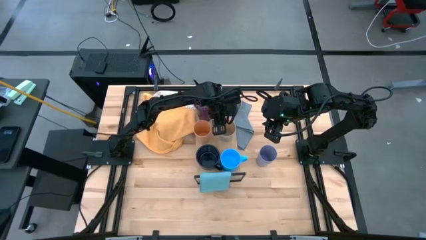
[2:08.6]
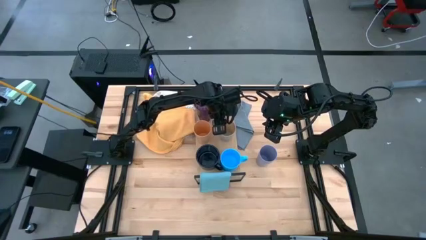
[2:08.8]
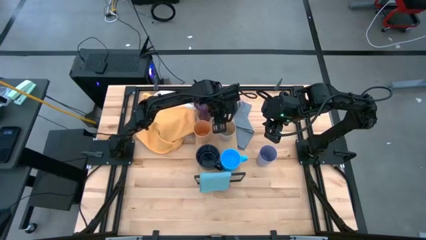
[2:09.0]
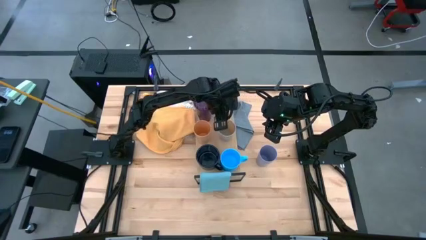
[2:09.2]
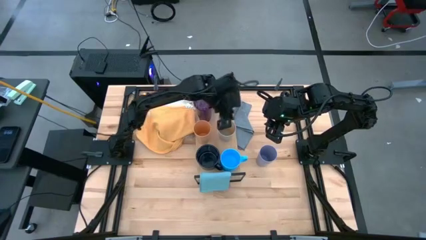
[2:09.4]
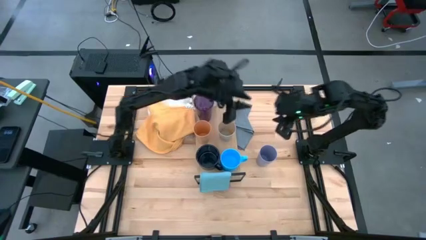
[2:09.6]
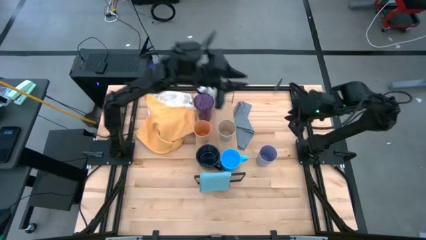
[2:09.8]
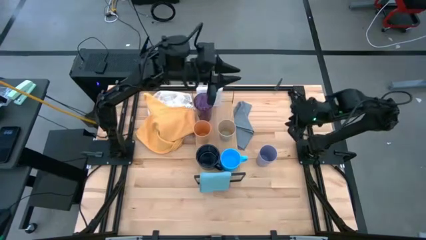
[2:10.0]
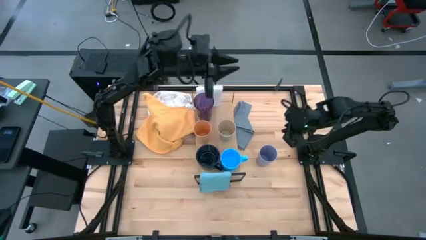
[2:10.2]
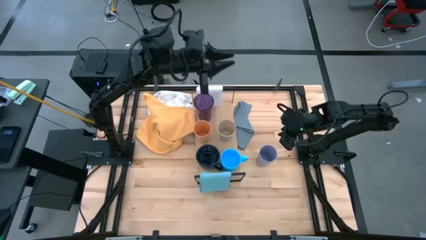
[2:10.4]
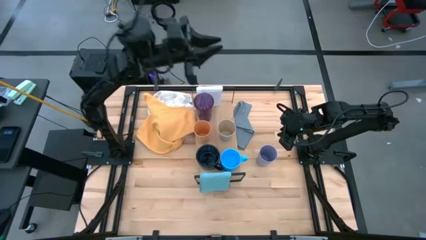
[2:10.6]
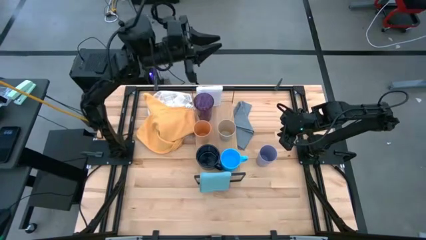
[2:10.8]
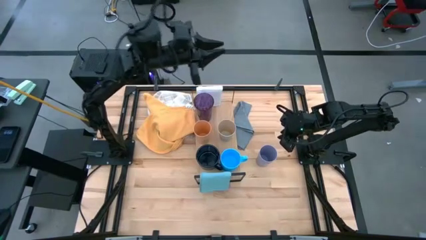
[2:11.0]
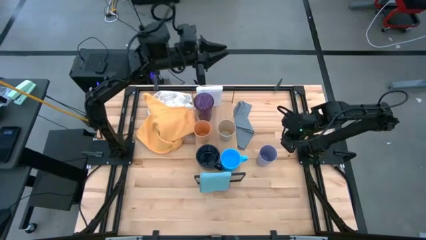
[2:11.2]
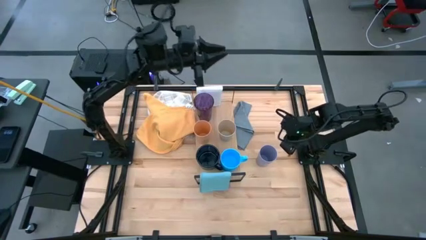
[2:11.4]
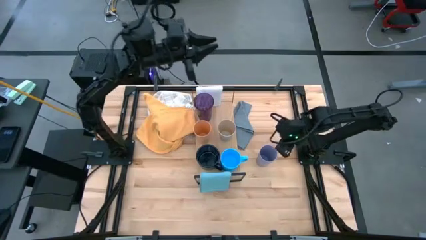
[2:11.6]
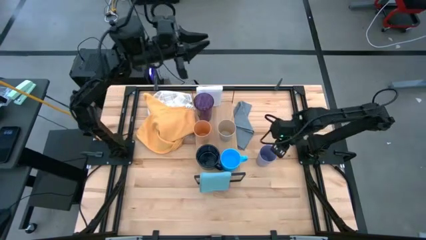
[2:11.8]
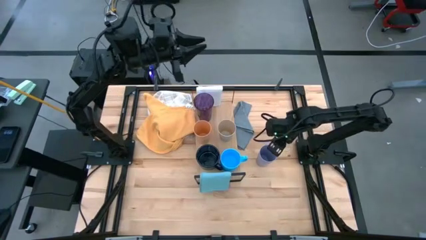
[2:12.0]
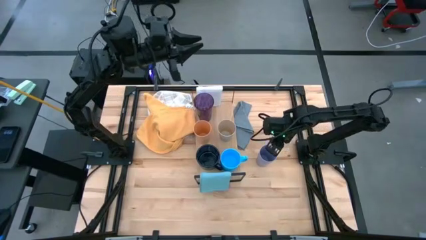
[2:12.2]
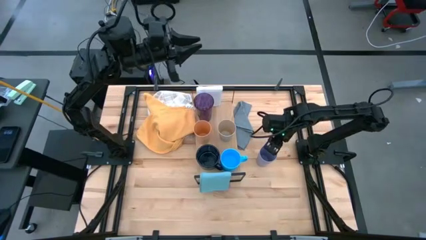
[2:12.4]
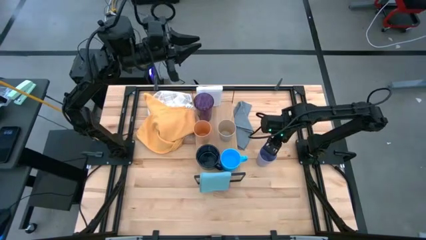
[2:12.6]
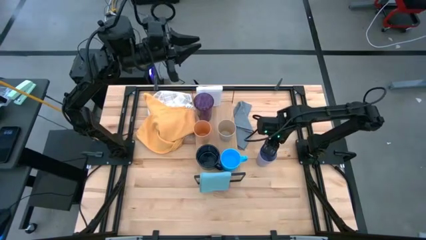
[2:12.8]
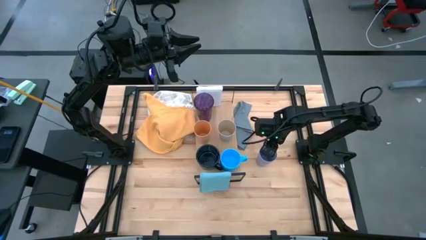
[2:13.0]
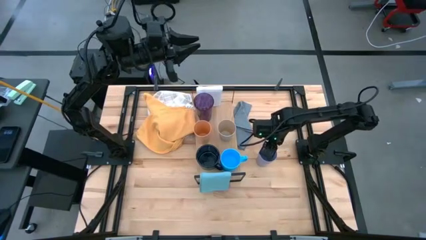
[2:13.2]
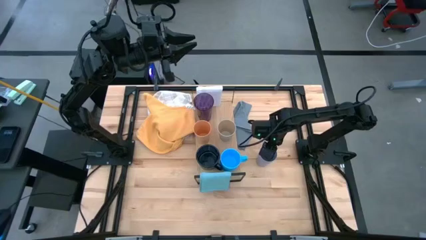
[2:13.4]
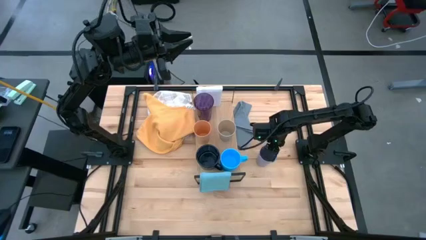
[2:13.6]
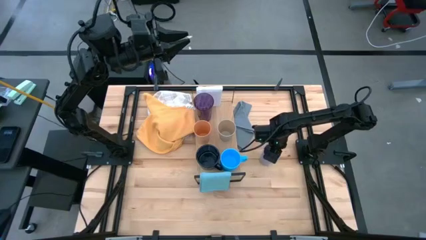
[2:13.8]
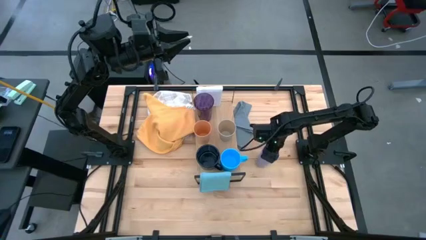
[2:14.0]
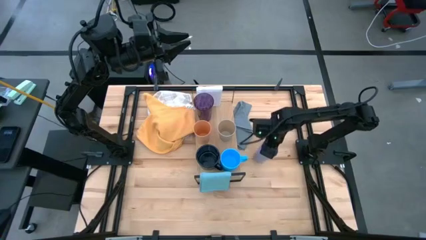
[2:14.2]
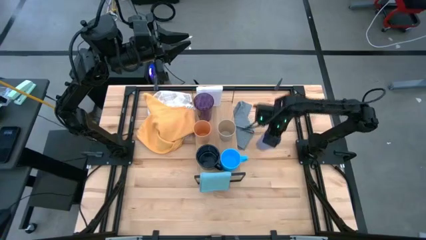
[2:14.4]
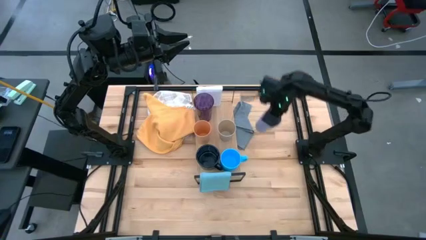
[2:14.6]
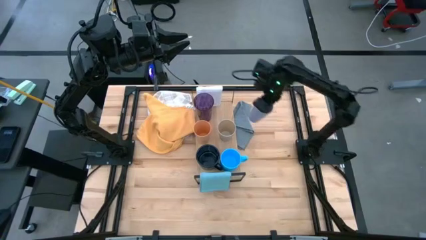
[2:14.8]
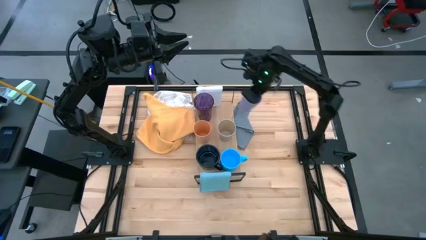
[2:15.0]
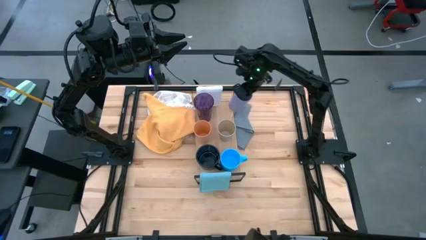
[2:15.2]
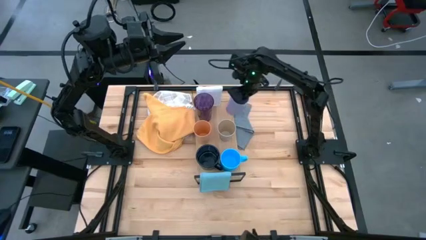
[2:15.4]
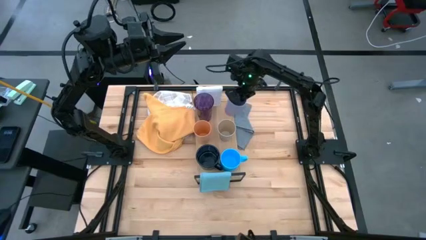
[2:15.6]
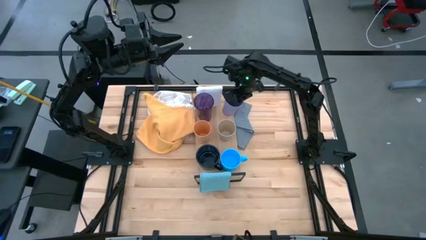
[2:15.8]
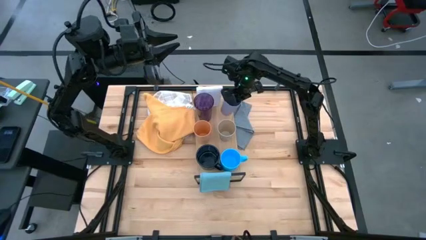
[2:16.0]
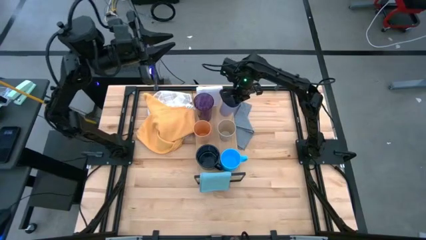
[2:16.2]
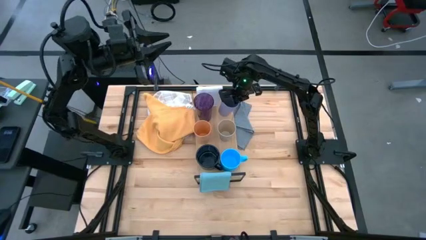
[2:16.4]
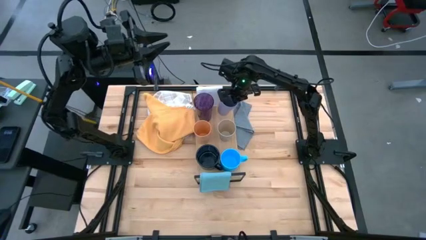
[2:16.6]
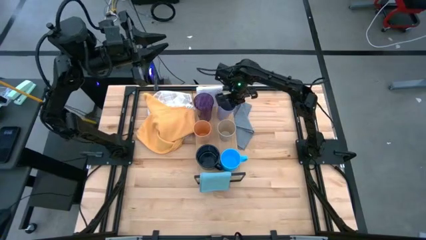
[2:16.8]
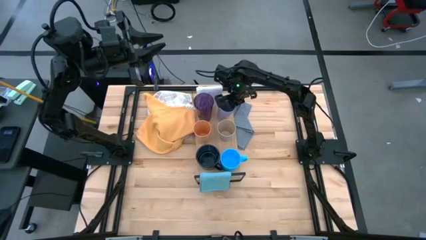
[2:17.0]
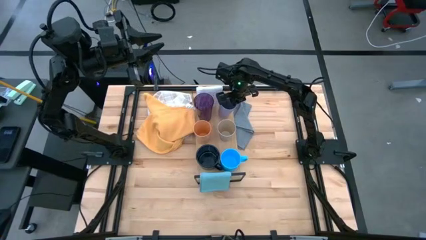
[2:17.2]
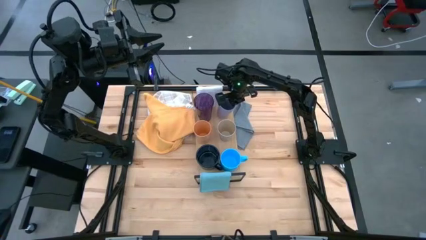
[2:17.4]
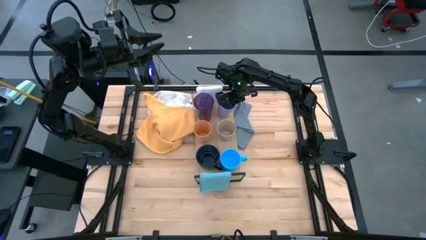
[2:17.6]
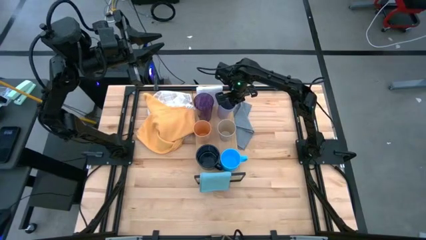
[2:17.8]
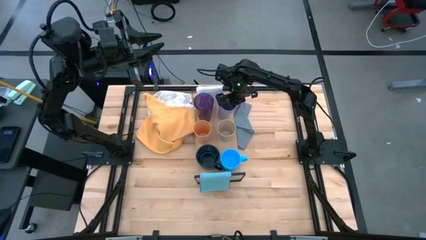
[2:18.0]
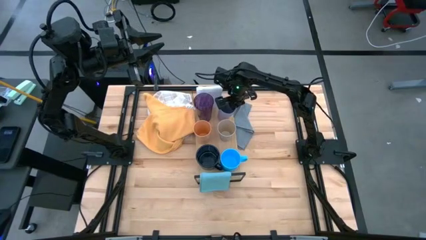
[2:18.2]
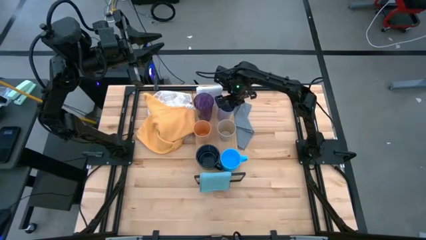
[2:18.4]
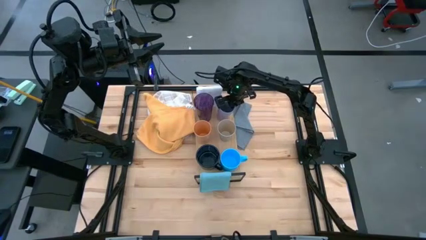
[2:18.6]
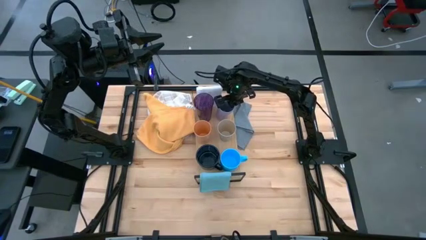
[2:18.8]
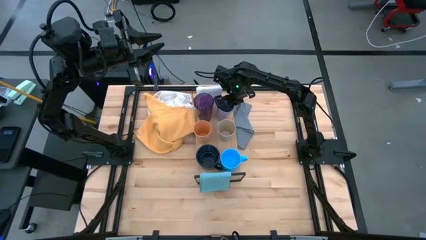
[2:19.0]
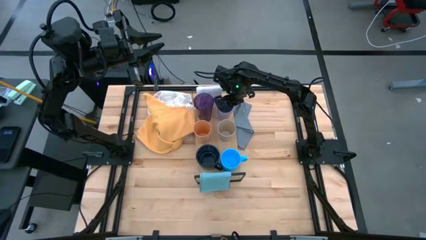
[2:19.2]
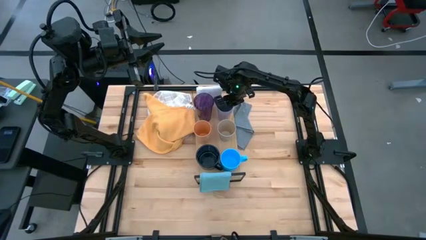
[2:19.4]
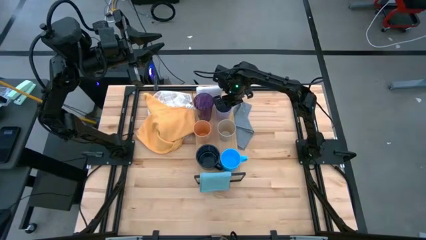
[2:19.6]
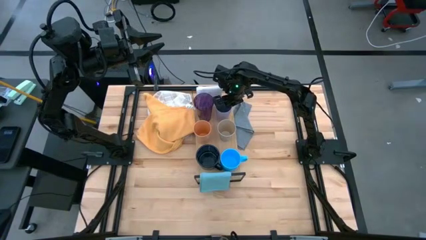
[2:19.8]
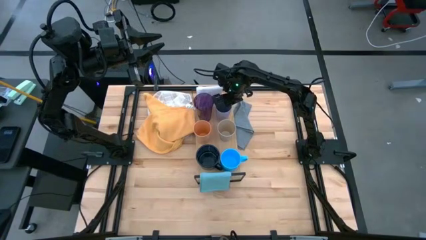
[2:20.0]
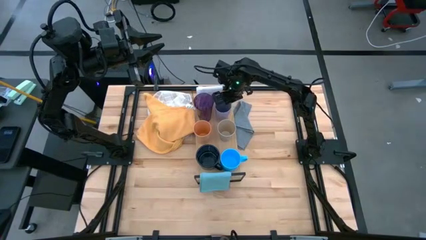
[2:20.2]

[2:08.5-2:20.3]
Task: Stack small to large cups/mugs on shelf
Put the violet cup on the shelf

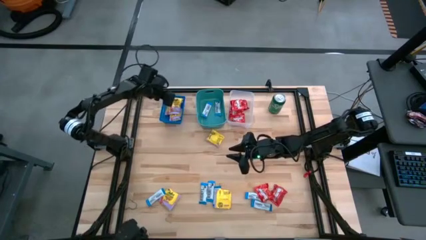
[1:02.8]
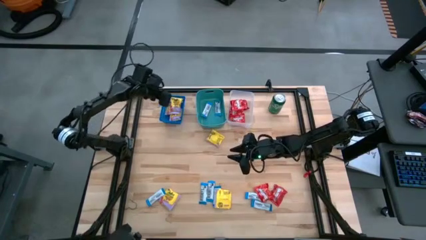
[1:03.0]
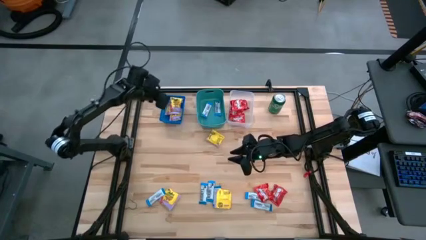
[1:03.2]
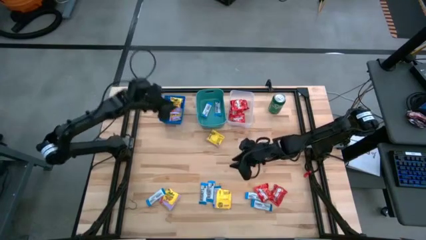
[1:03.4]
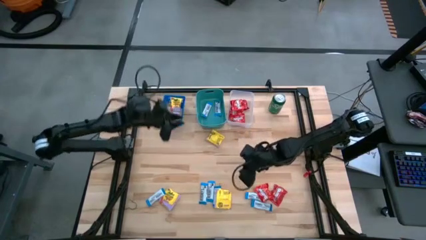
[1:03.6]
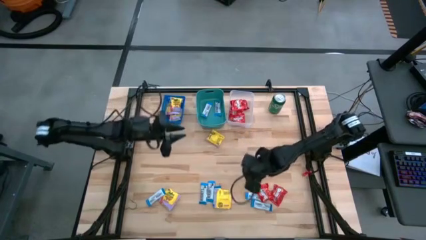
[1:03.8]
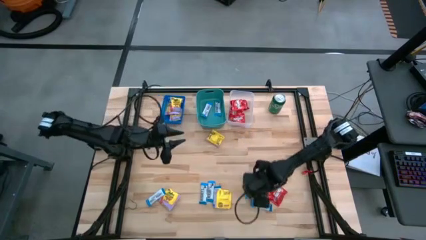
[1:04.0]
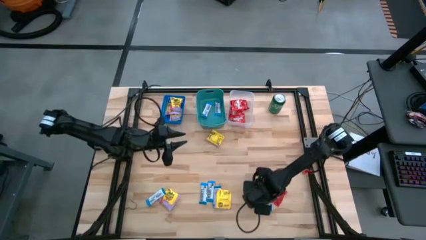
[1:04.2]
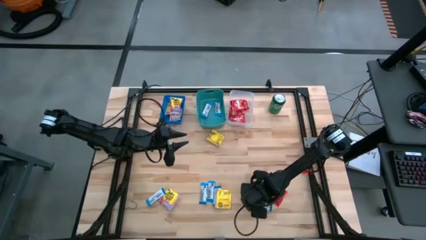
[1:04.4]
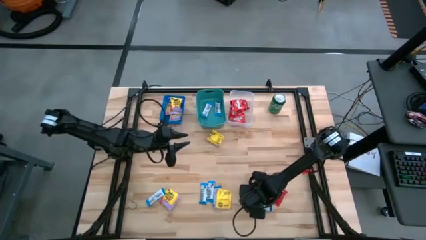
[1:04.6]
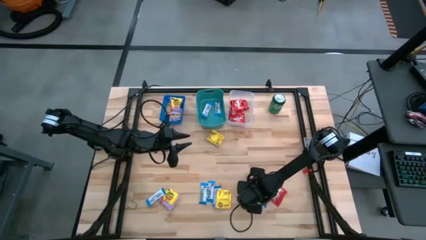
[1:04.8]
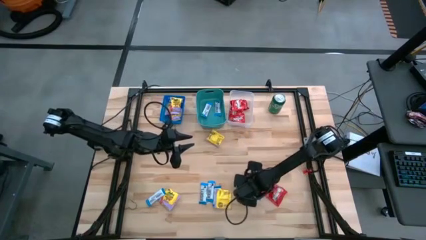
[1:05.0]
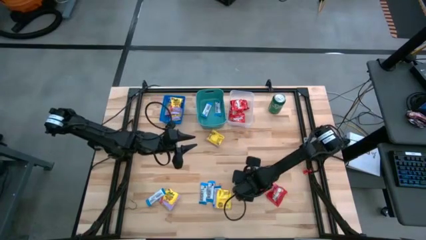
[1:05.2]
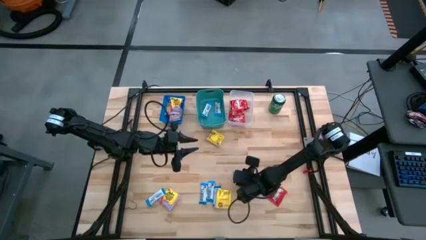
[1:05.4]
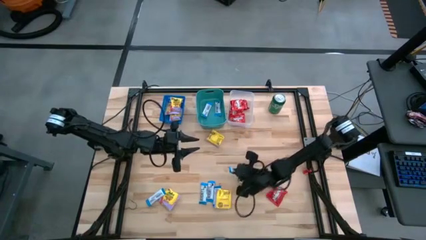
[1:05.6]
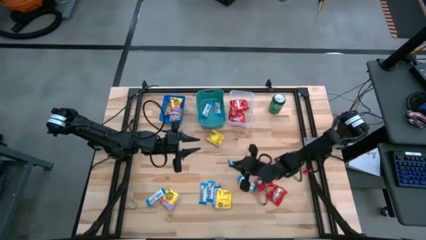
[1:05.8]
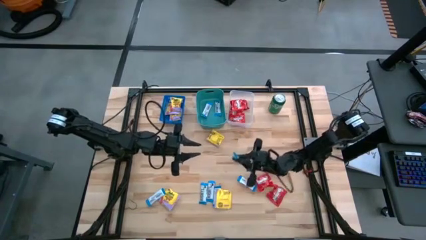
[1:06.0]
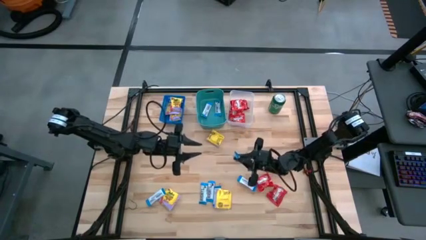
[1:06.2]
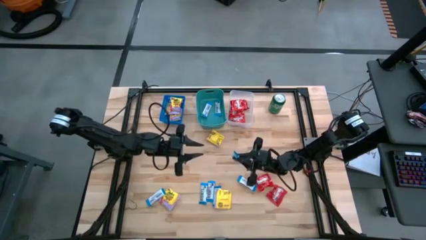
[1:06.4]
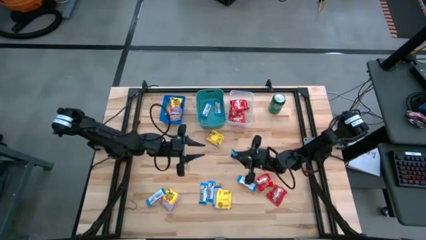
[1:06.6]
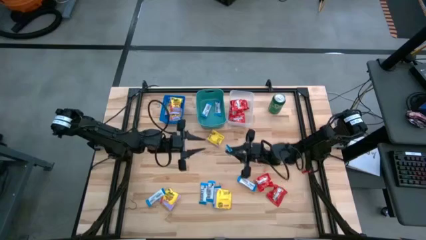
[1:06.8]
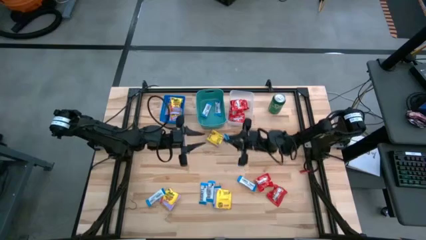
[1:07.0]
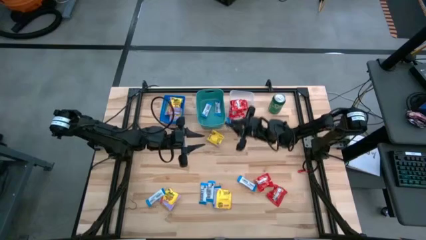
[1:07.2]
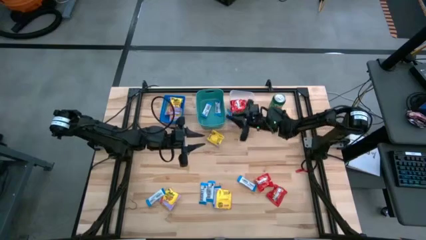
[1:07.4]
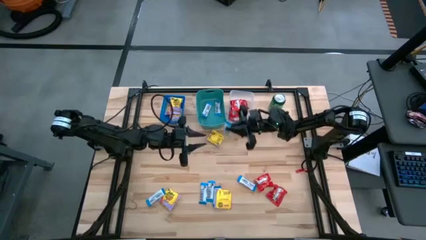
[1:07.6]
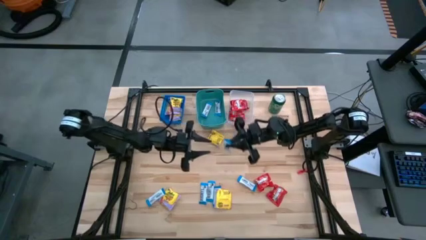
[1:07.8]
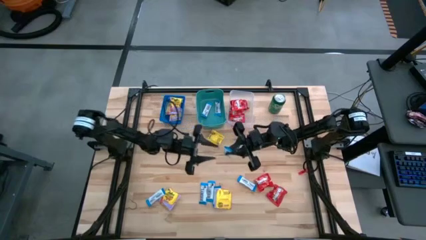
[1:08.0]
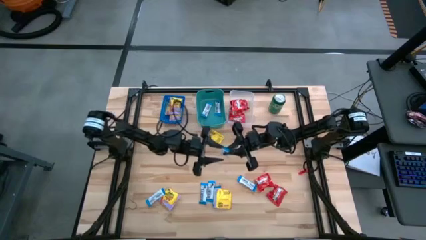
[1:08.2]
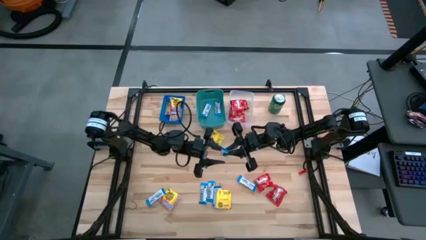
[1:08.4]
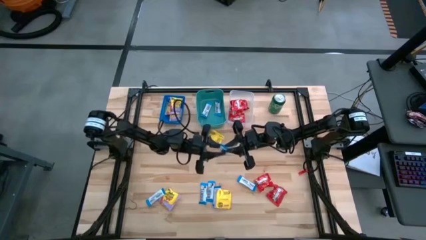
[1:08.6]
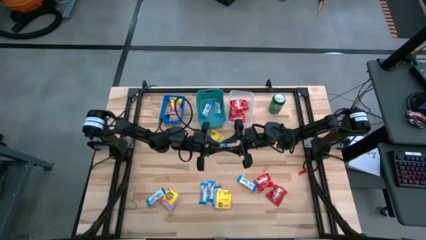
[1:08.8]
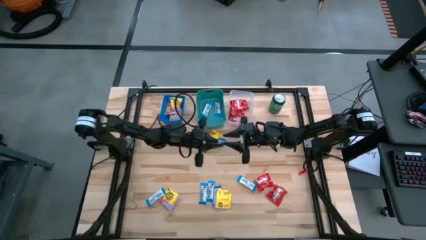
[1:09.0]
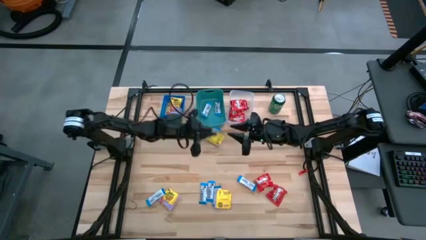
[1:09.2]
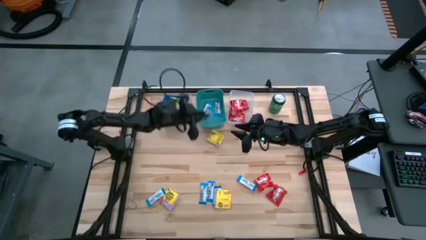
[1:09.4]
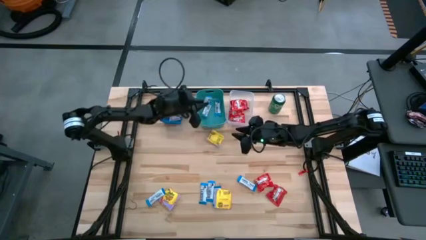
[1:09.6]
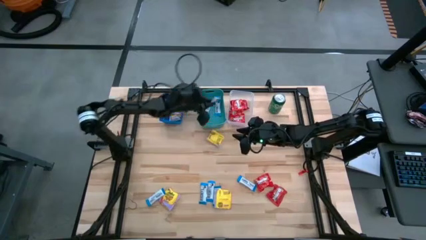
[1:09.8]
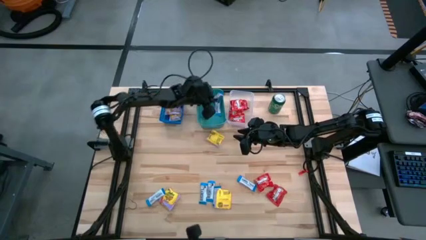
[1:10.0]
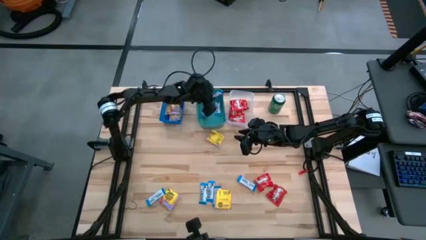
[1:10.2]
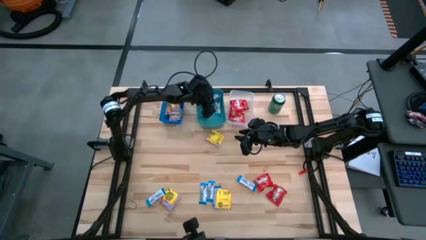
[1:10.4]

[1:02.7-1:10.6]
Task: Sort candy
Put the white chocolate bar into the green bin
